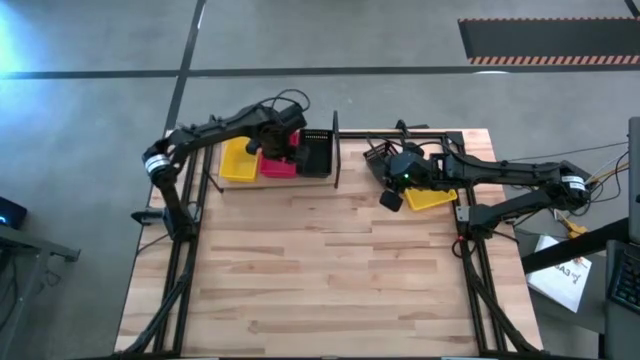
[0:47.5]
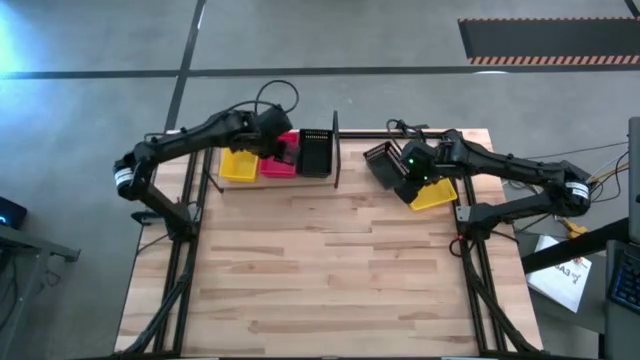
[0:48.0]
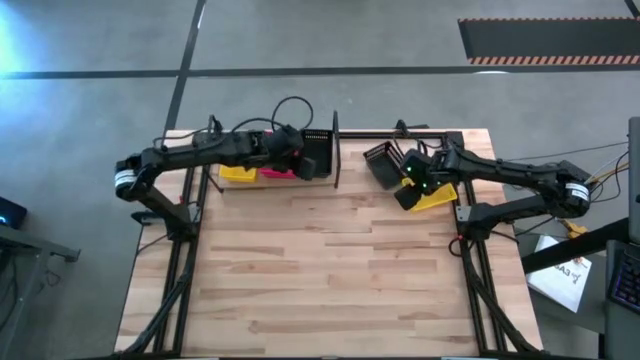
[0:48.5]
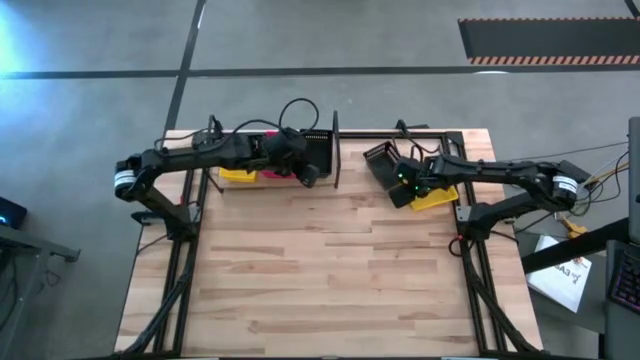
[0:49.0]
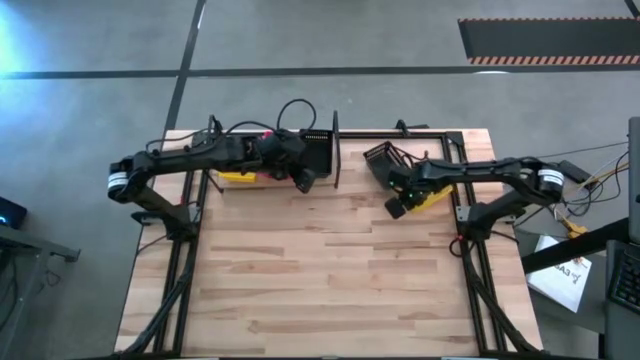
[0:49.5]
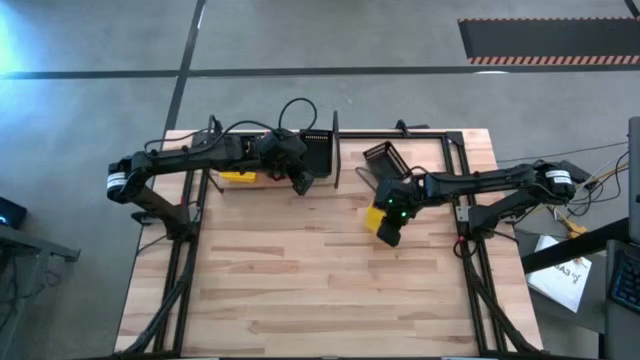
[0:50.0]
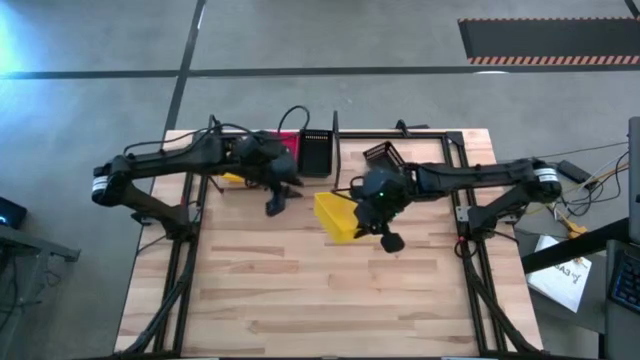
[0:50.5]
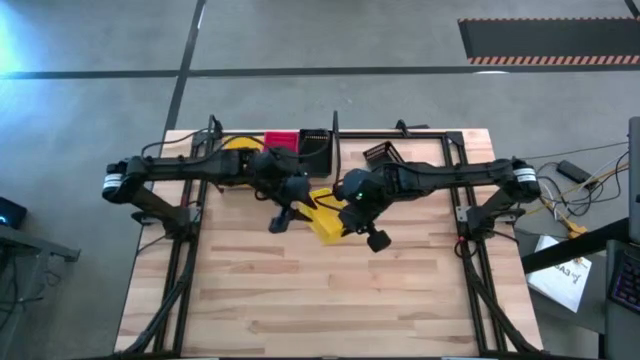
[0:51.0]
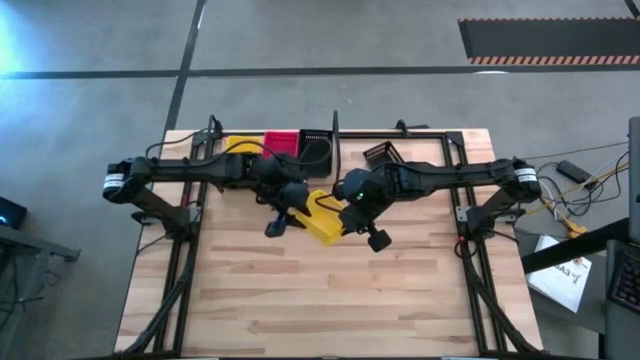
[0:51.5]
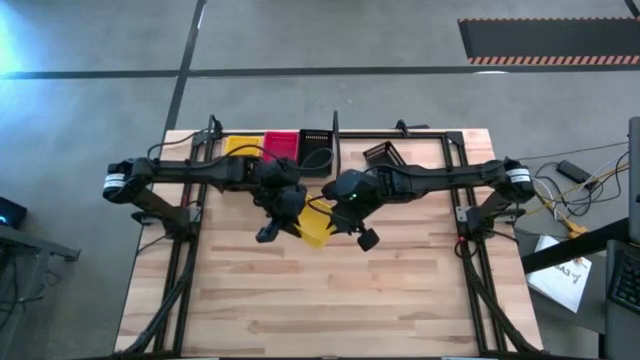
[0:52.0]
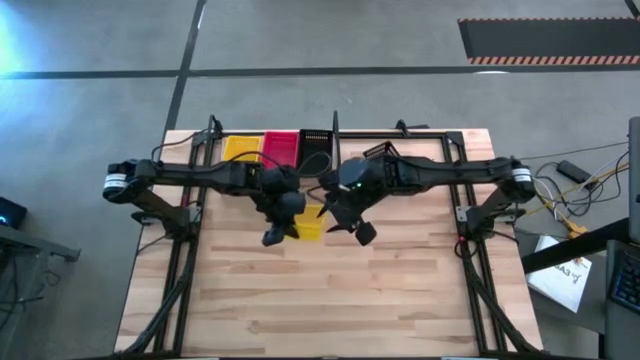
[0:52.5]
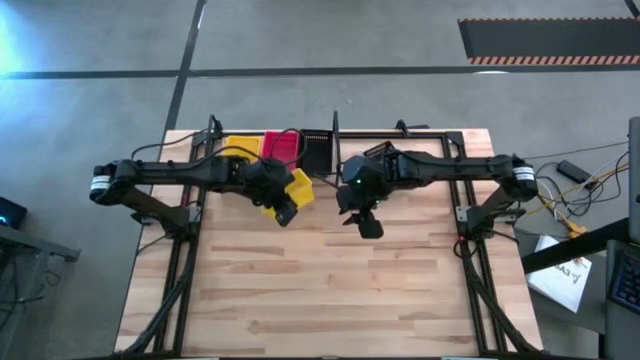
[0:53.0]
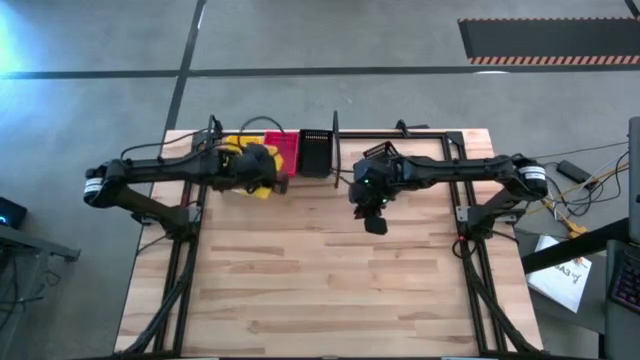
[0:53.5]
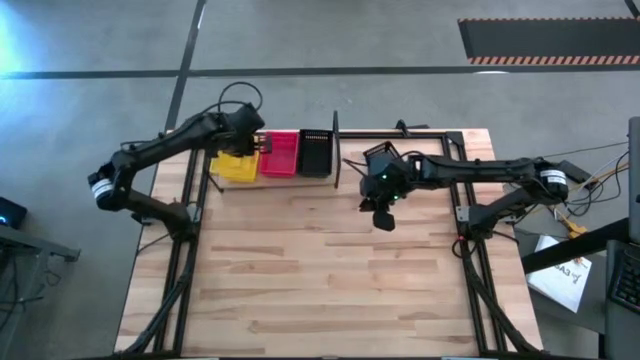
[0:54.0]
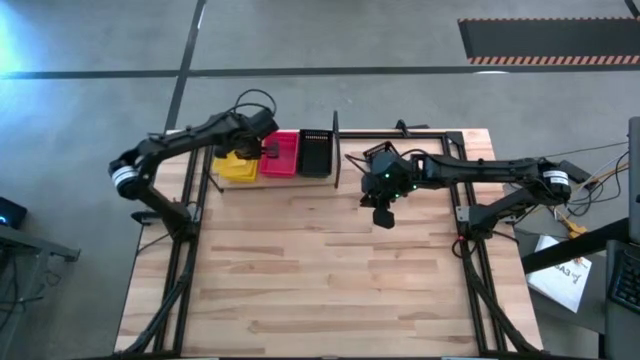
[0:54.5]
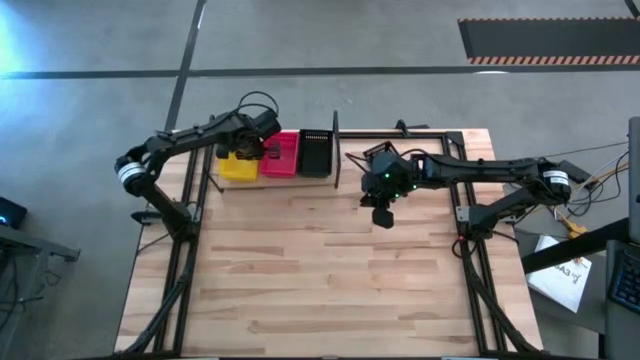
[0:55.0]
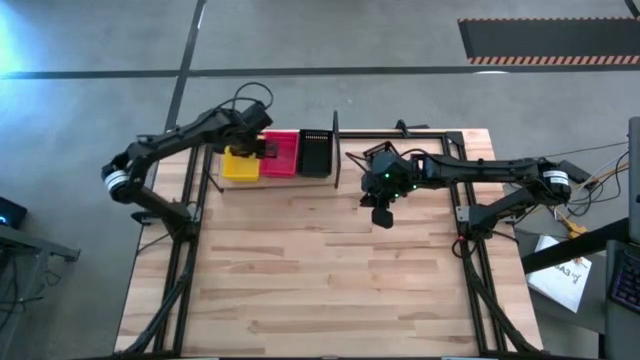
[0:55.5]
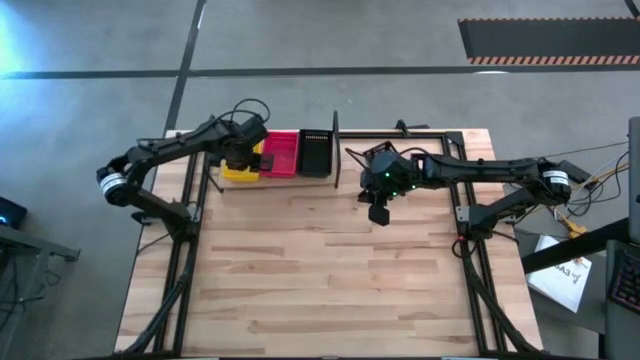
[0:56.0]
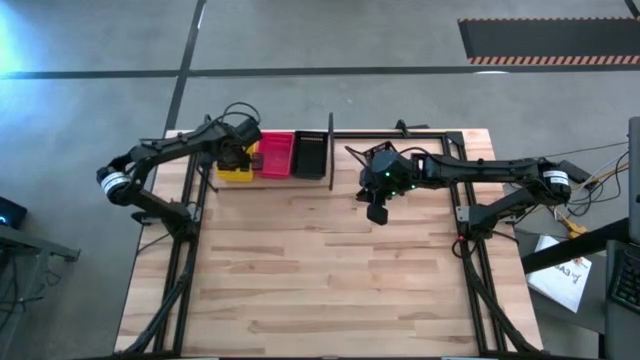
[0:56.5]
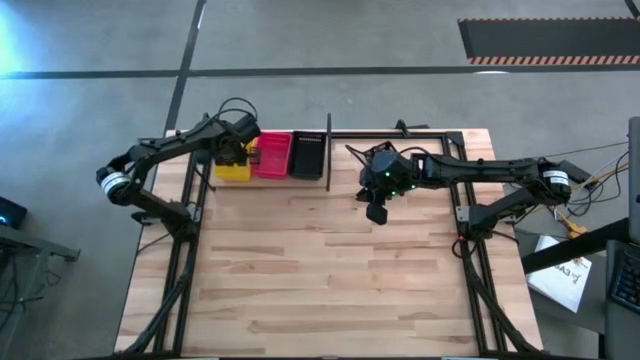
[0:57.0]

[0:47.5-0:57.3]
Task: Stack baskets on shelf by color
Stack the yellow bin on top of the yellow bin on the shelf

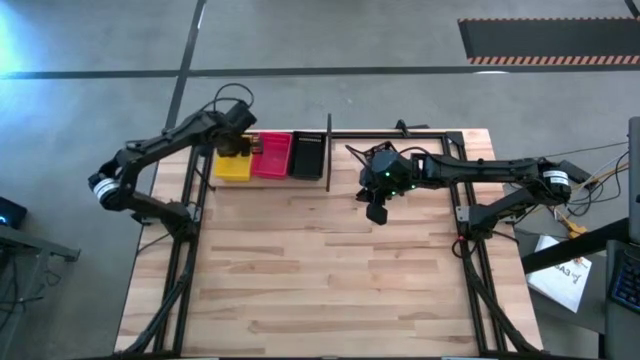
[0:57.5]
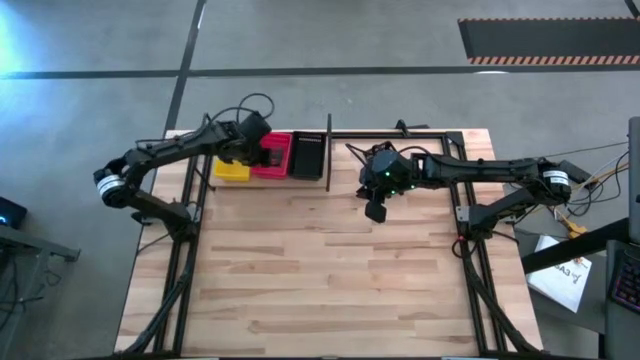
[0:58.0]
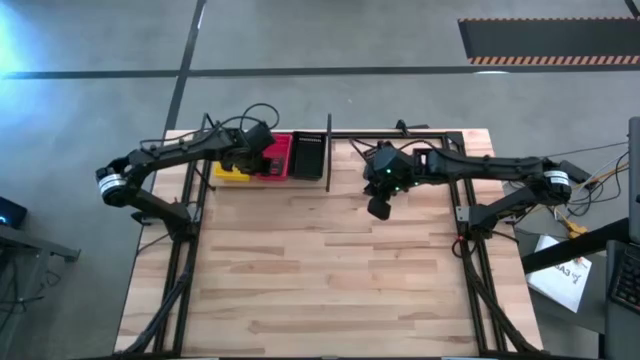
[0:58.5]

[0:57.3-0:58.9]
Adjust the stack of red bins on the shelf

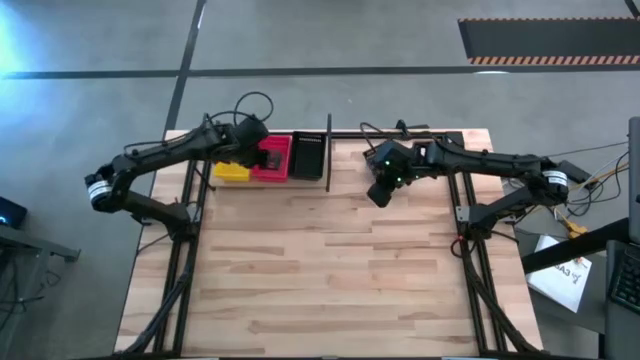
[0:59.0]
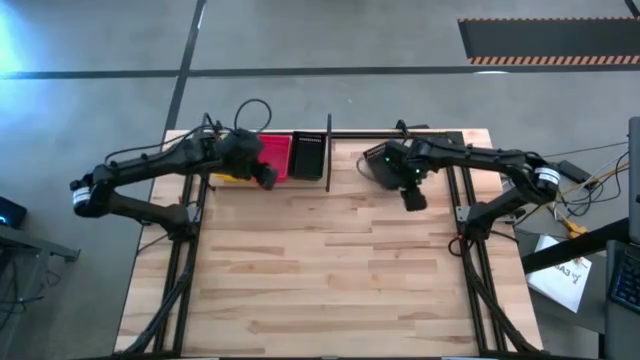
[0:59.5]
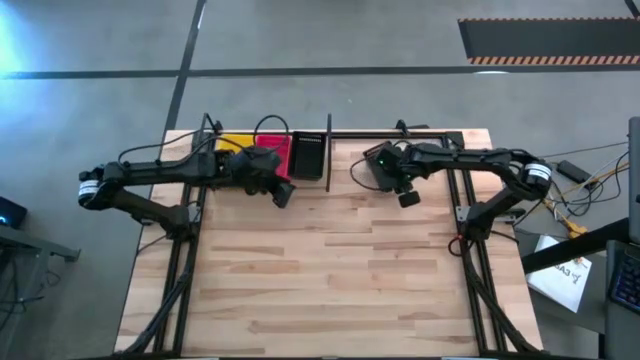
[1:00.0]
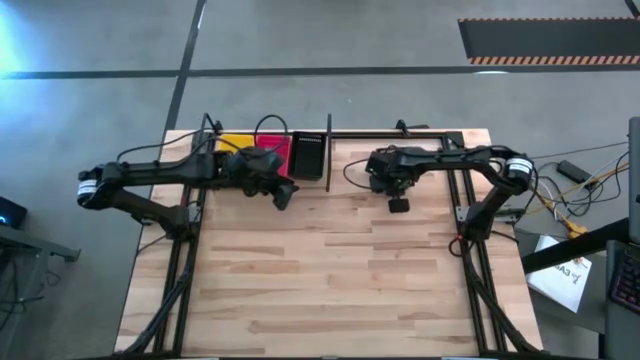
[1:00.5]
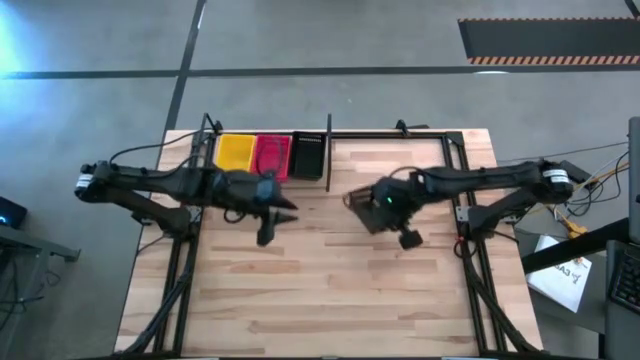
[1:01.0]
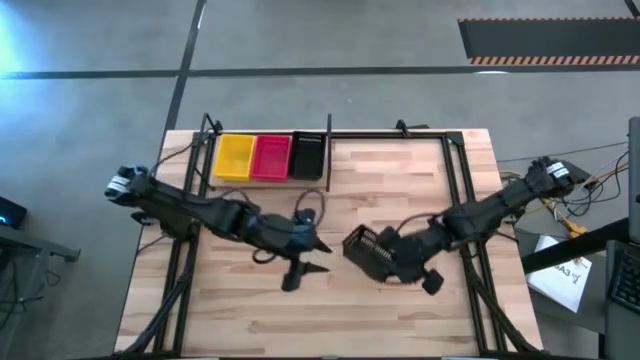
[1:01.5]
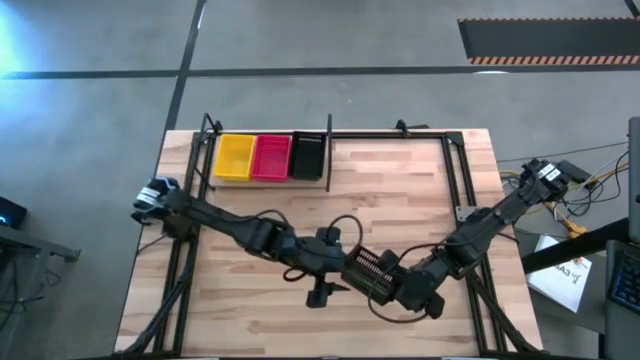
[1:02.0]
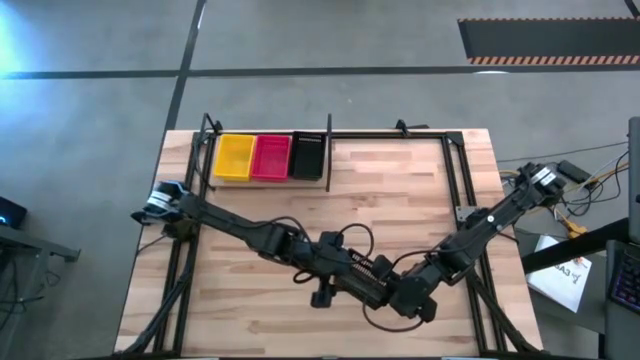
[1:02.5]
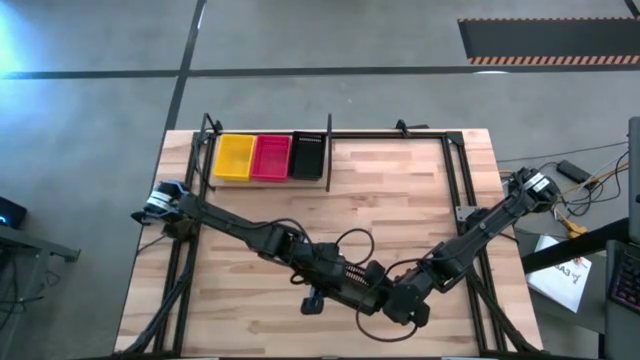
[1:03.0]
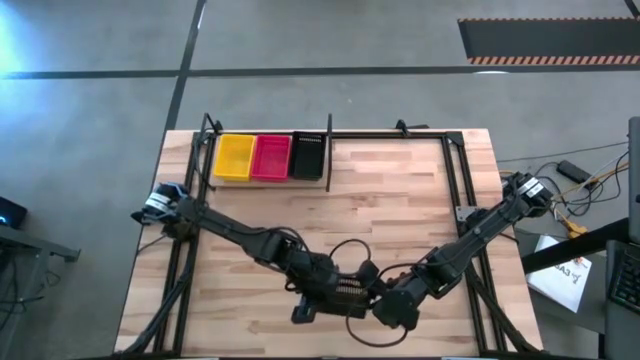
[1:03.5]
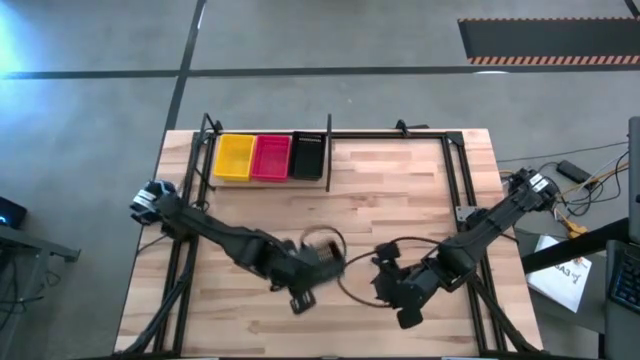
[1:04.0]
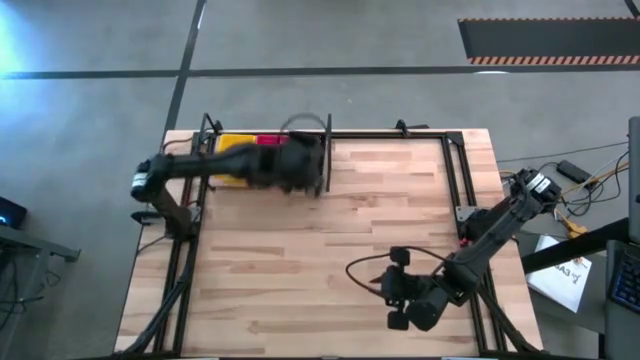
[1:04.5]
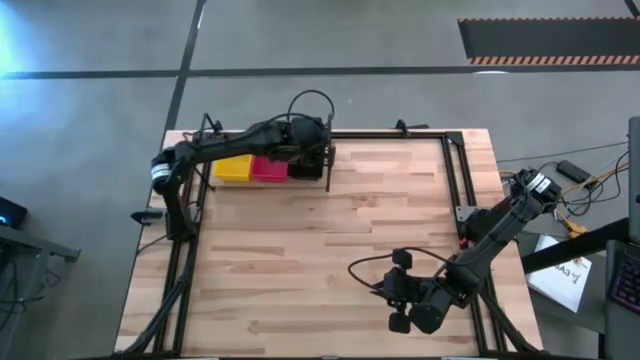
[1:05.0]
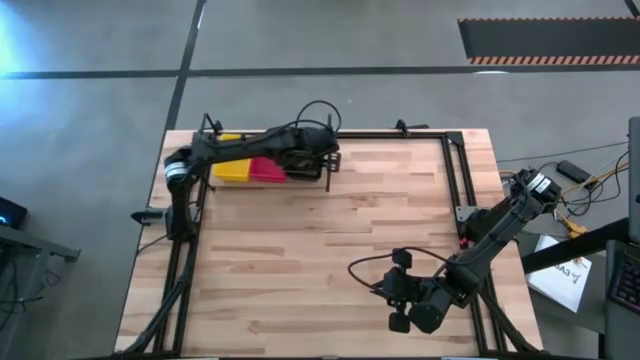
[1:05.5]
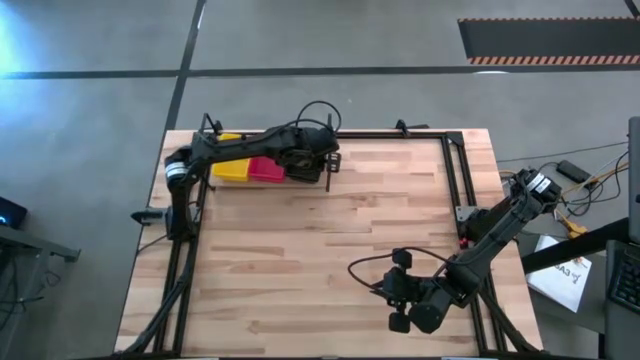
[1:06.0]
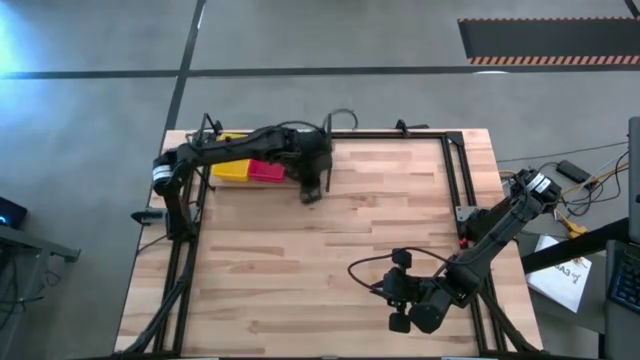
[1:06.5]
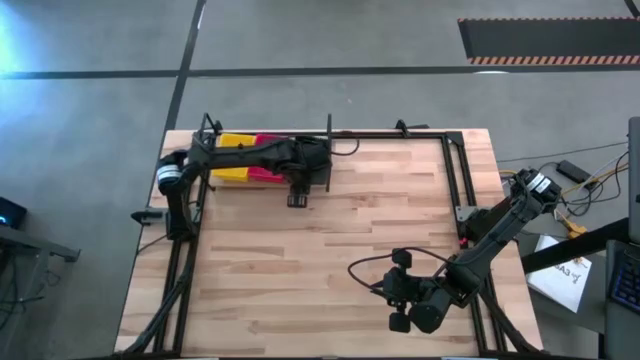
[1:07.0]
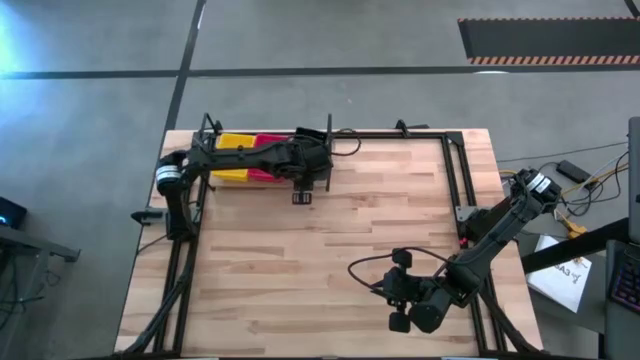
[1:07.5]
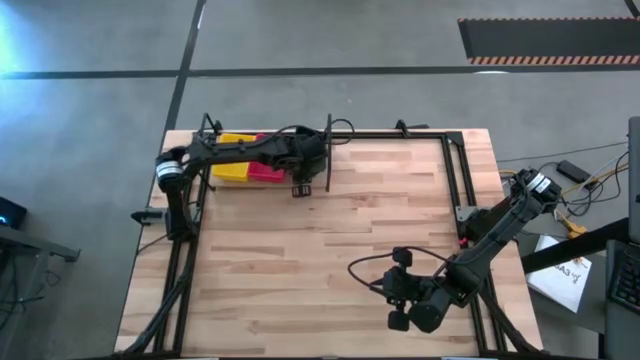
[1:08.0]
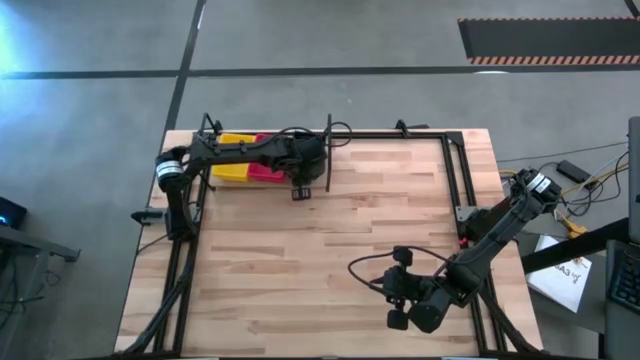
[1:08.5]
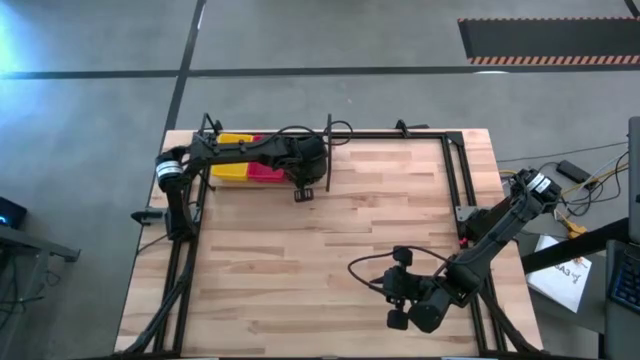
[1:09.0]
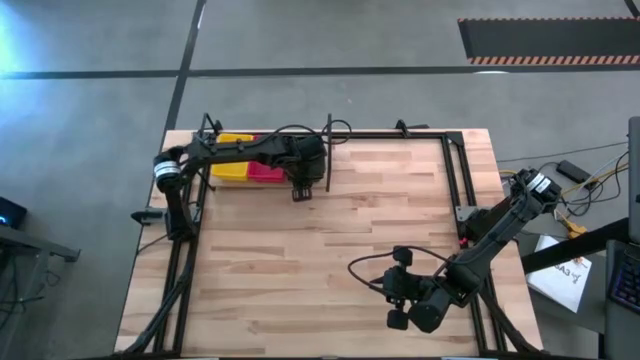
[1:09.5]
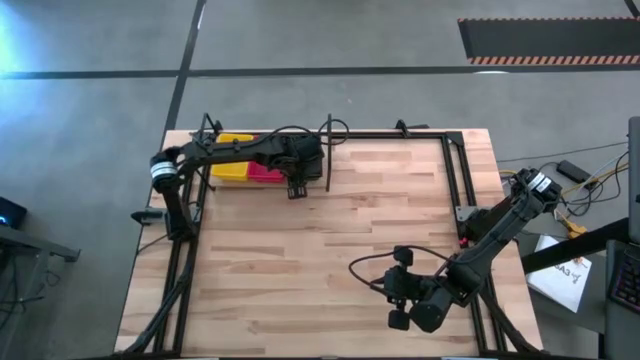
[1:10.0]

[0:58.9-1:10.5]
Stack the black bin on top of the black bin on the shelf
